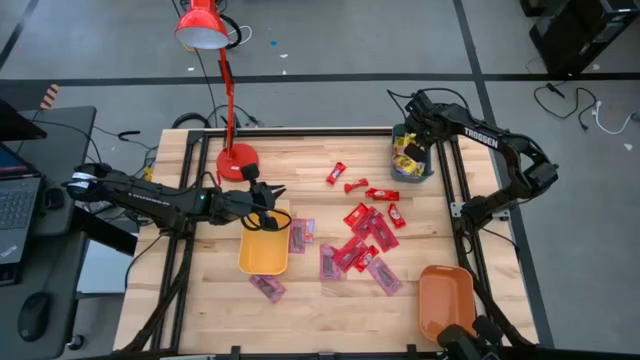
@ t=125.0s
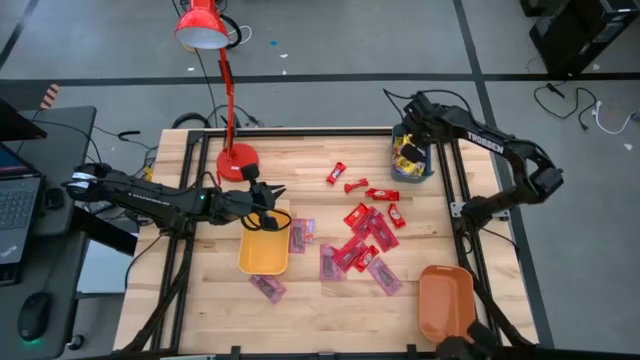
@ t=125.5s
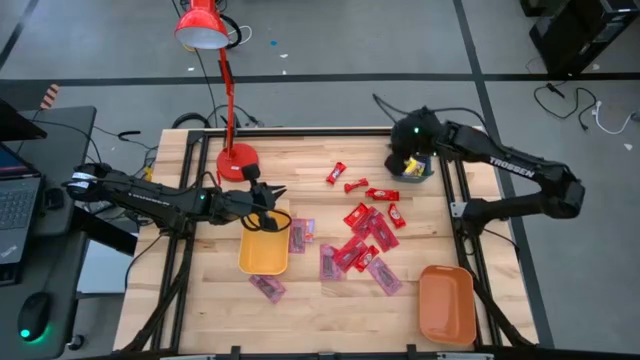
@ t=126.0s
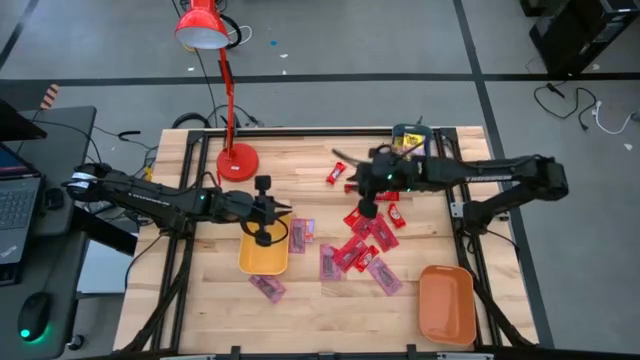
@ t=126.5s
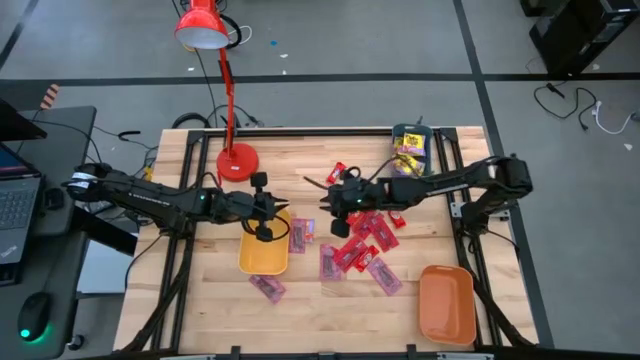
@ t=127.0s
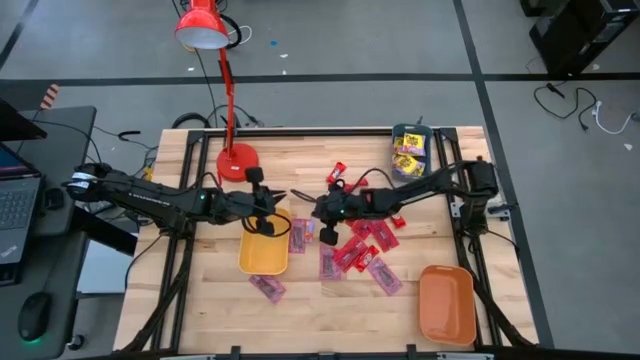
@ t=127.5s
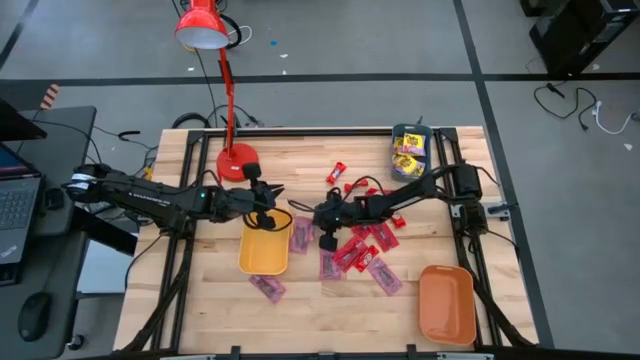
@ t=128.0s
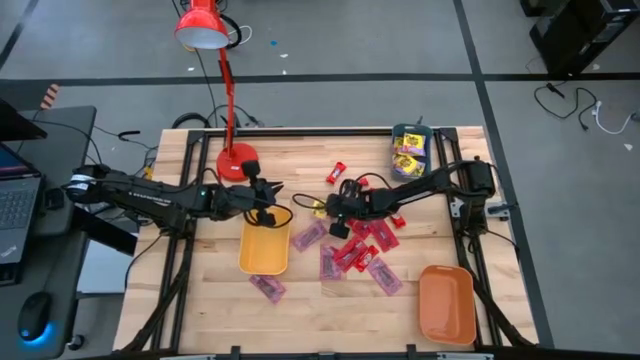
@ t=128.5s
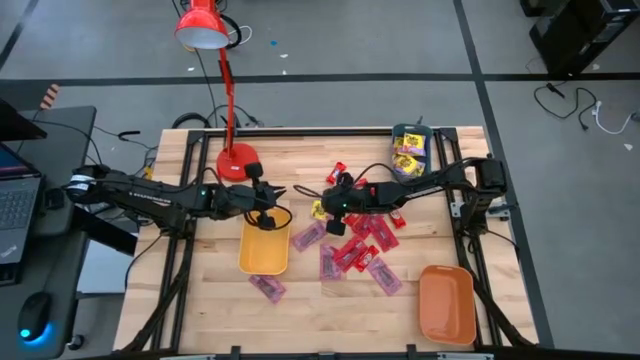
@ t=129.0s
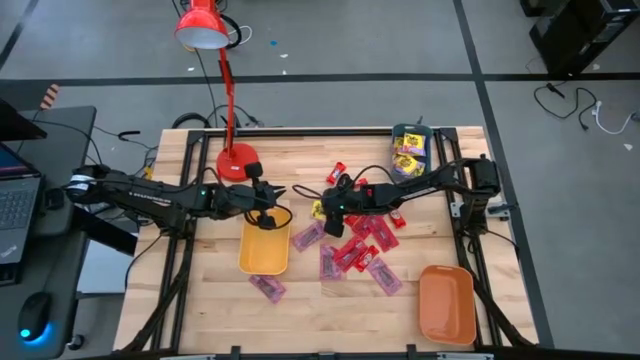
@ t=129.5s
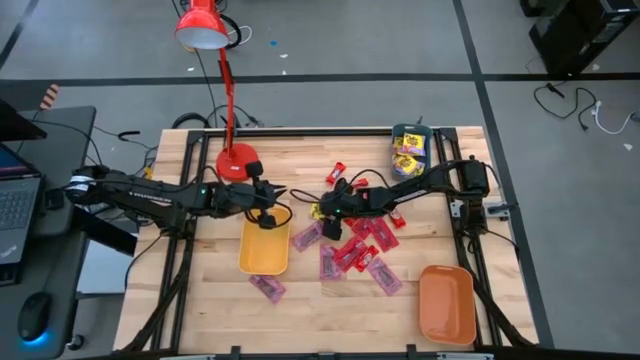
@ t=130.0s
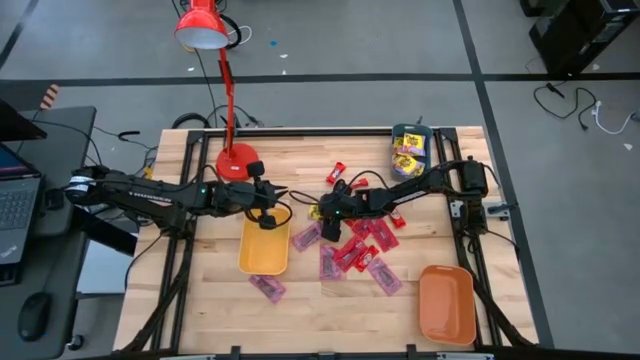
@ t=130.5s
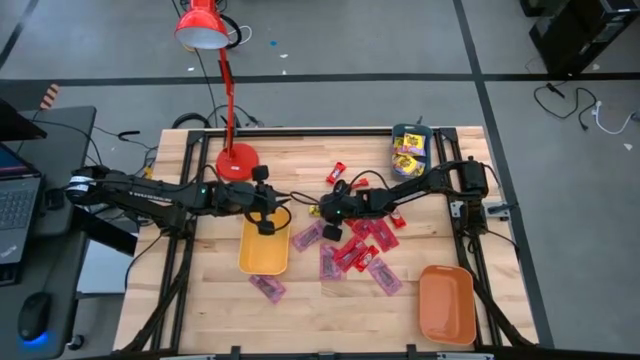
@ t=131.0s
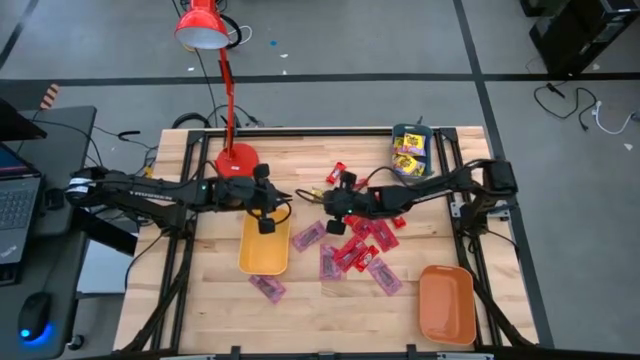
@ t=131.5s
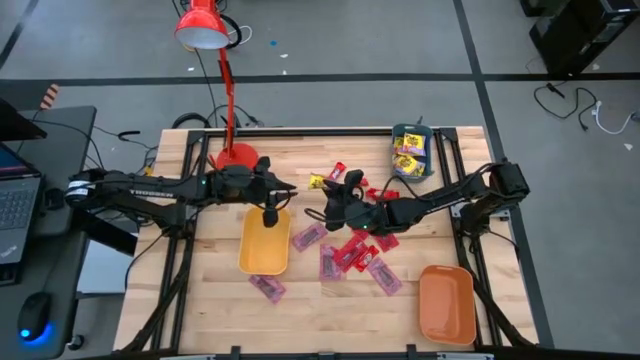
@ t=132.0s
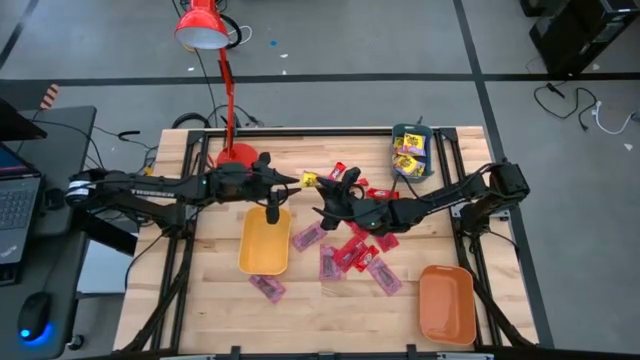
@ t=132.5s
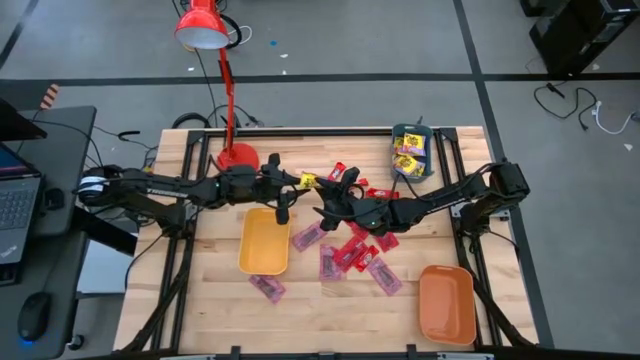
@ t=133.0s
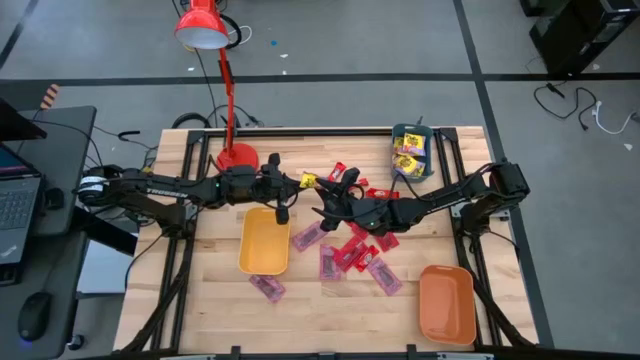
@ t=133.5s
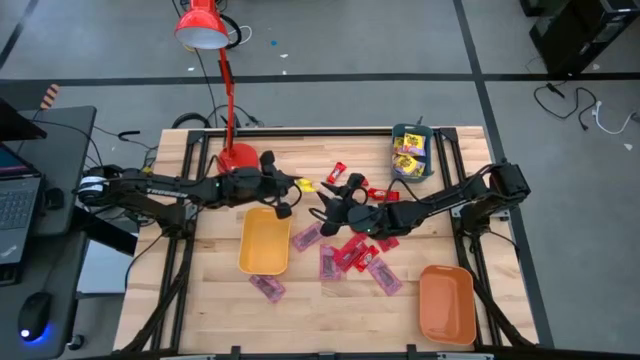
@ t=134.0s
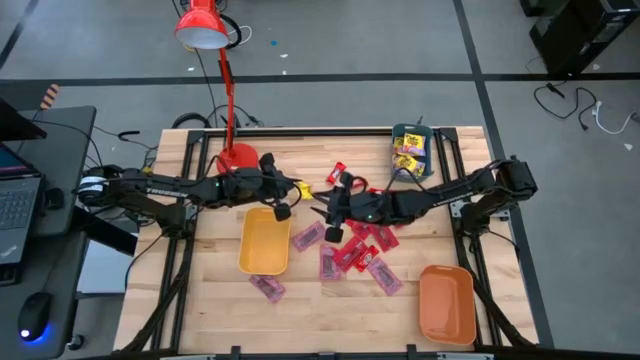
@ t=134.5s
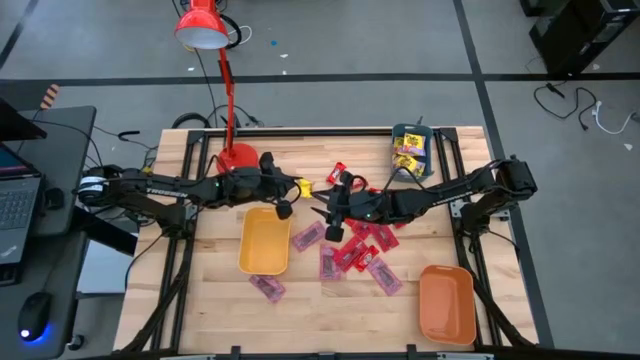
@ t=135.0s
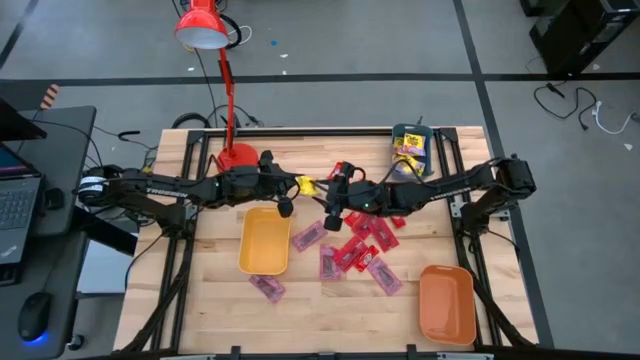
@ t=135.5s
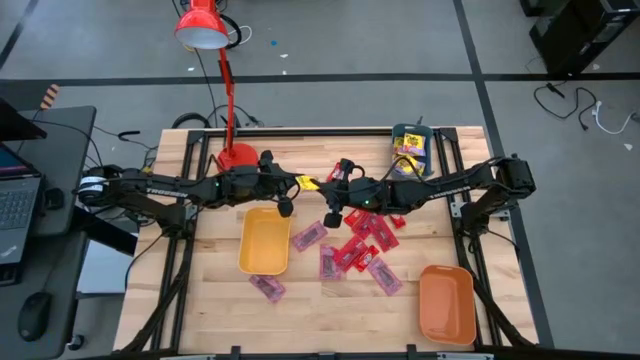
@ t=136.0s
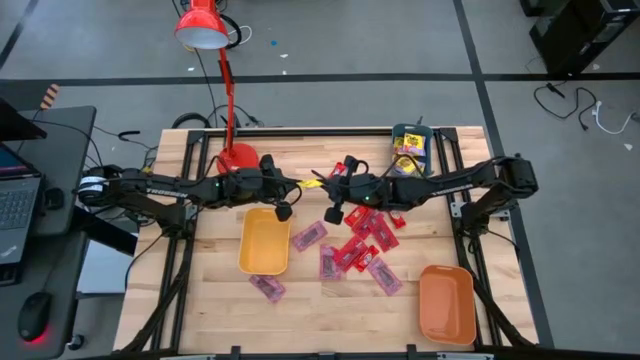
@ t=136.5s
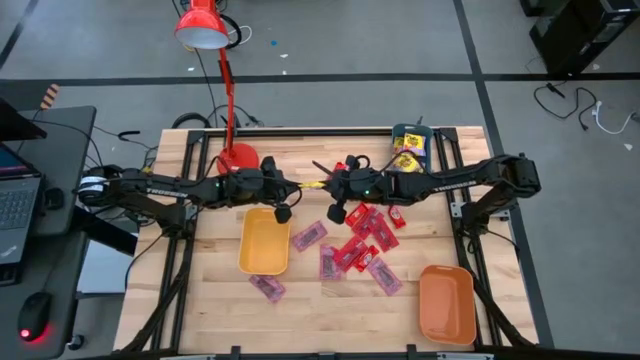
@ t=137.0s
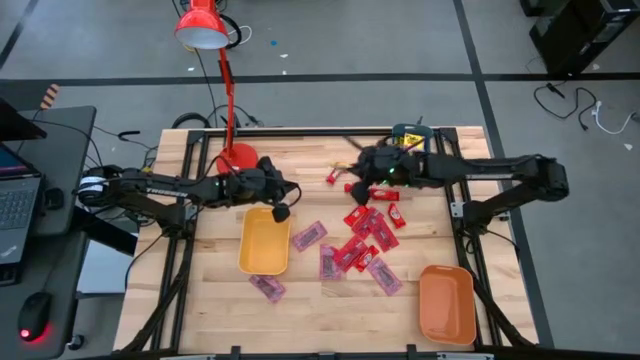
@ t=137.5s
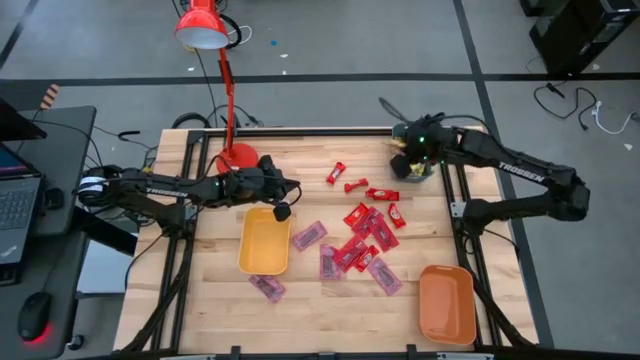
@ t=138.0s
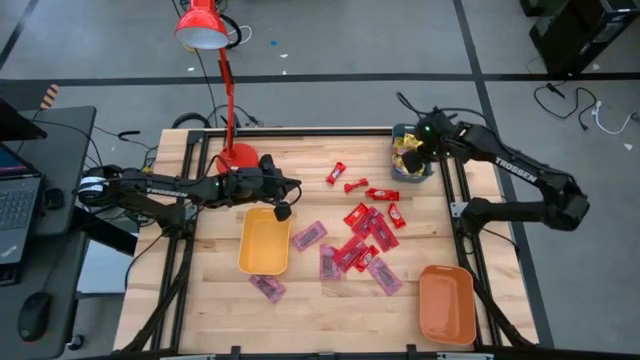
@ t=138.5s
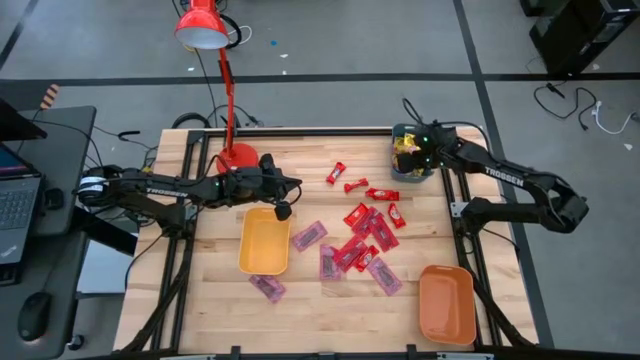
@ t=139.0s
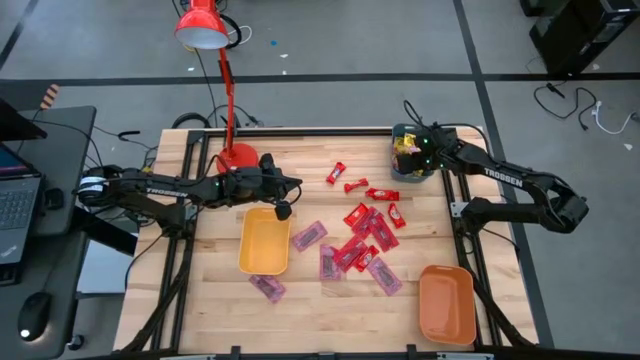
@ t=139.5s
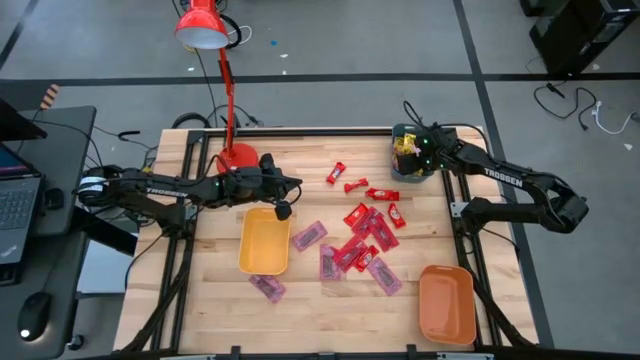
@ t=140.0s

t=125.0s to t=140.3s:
Task: Sort candy
Put the yellow candy pack into the blue bin

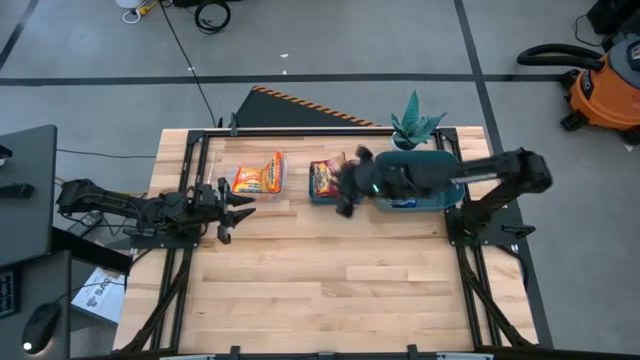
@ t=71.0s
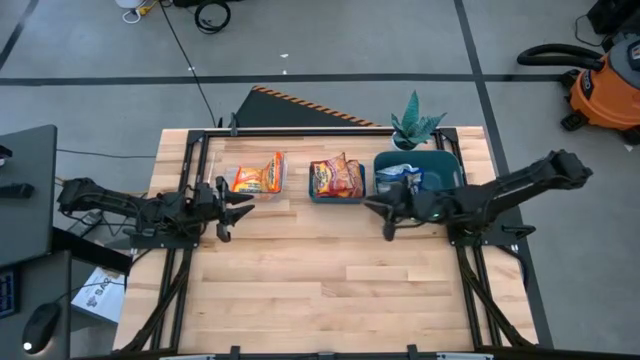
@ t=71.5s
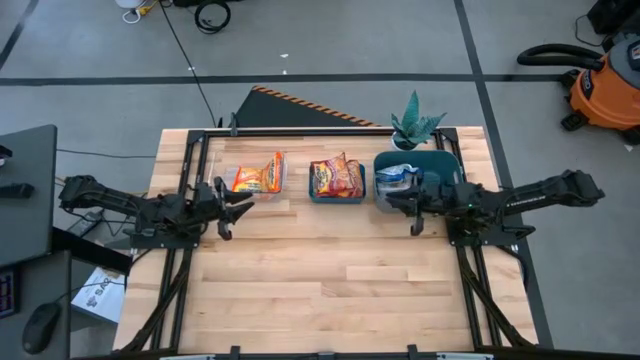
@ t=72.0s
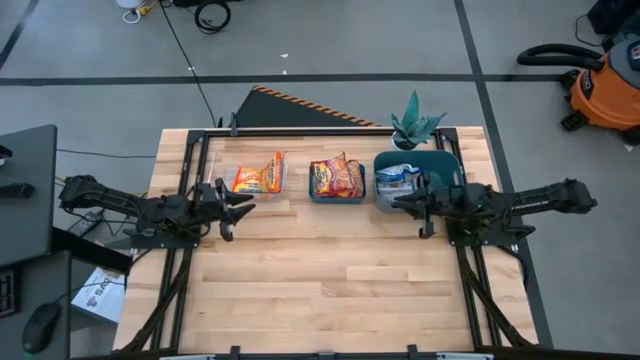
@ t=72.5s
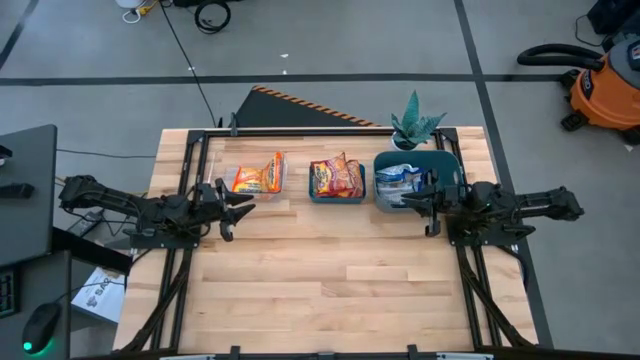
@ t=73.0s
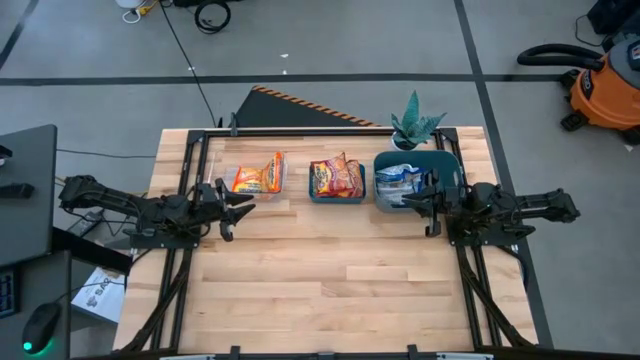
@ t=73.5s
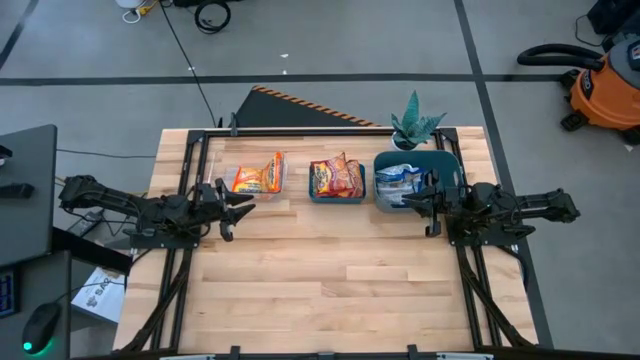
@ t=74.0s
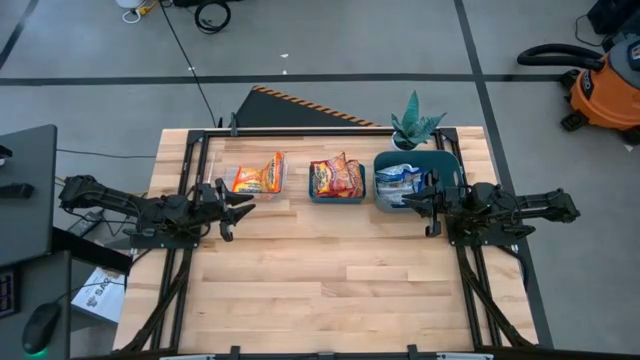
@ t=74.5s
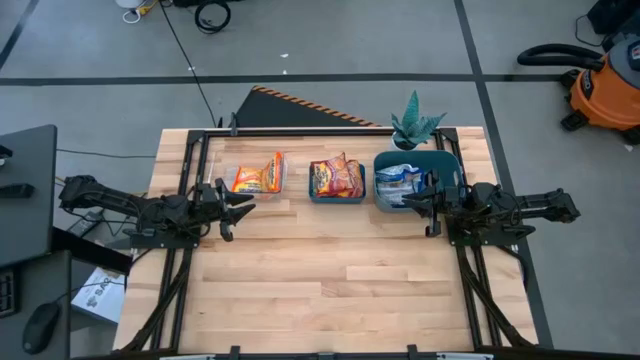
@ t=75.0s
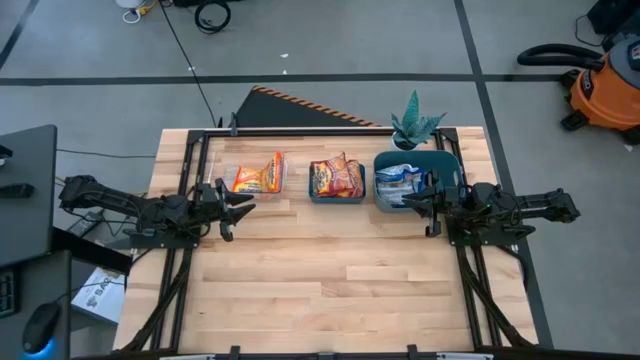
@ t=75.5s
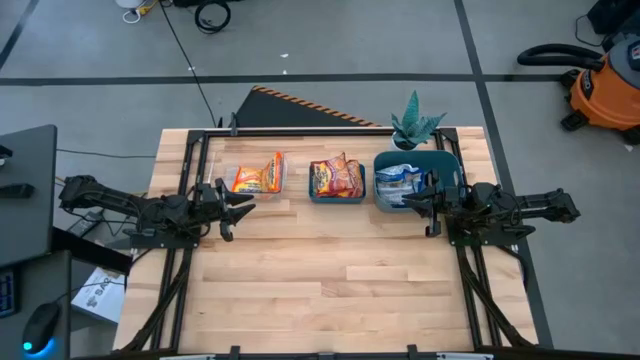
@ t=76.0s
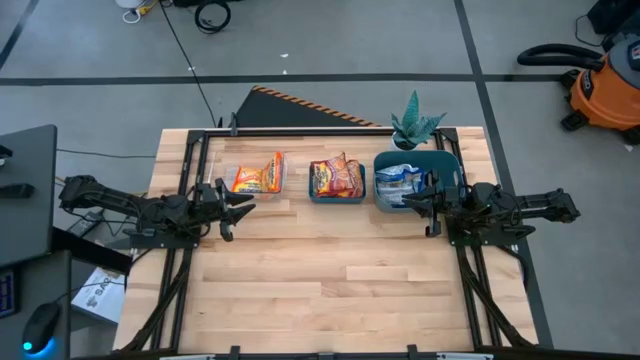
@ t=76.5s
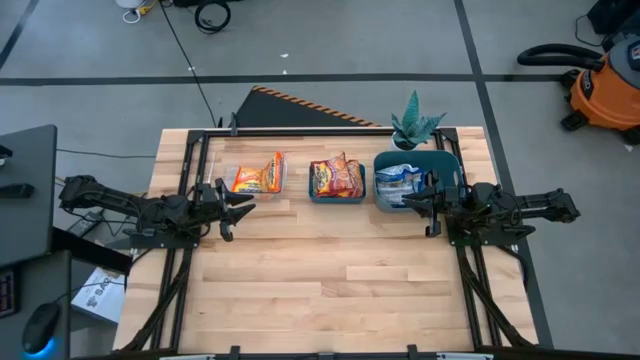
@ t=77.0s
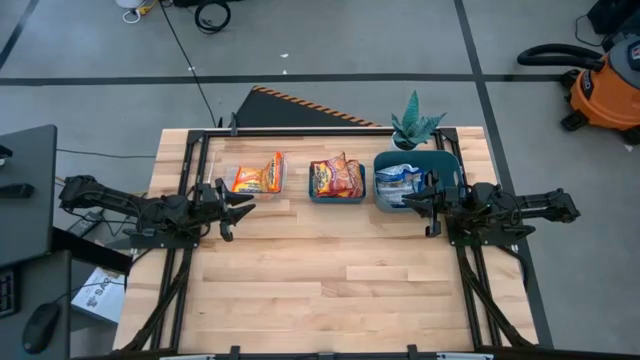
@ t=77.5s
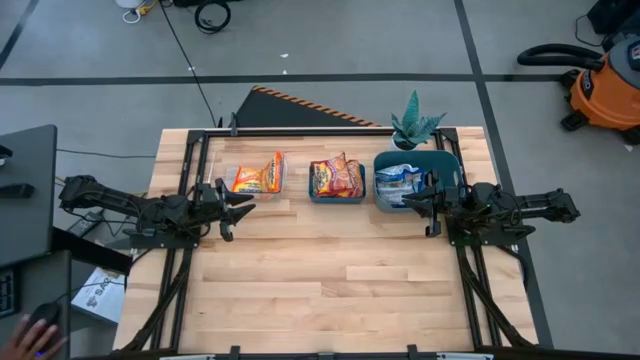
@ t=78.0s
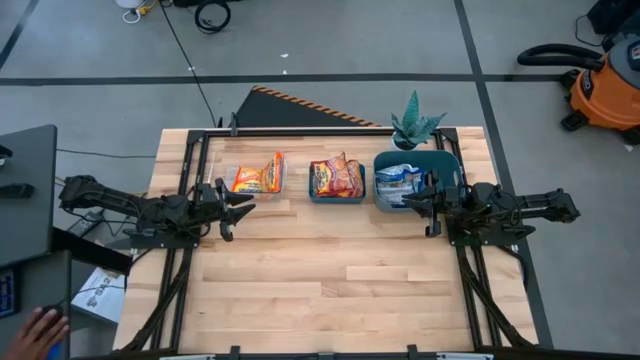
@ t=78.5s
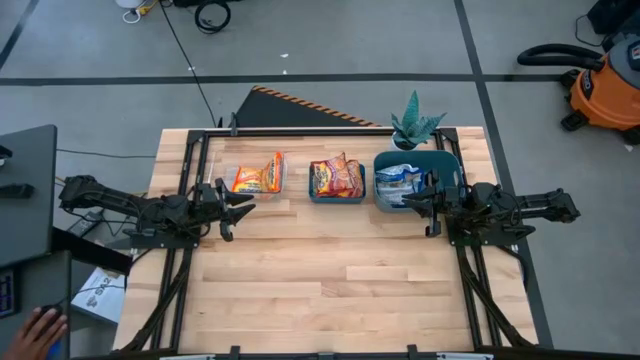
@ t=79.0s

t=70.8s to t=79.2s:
Task: Sort Maruchan noodles
Return to Home Position
